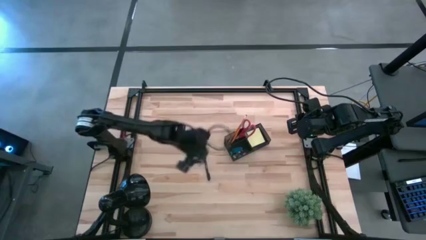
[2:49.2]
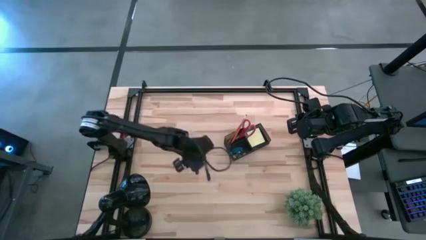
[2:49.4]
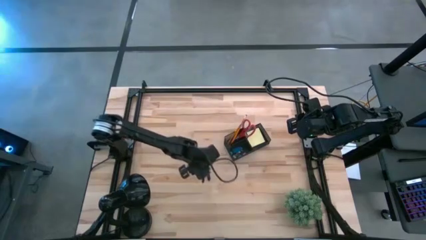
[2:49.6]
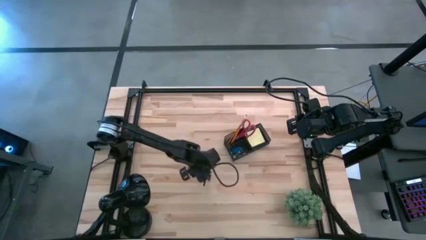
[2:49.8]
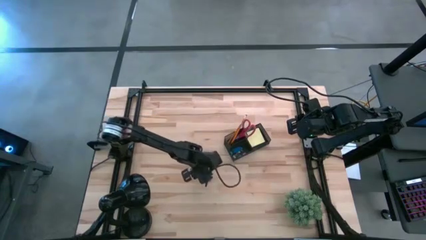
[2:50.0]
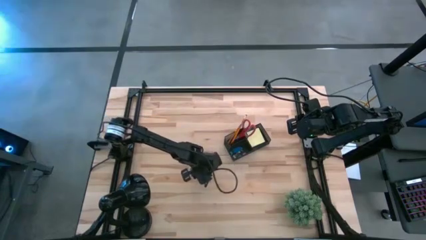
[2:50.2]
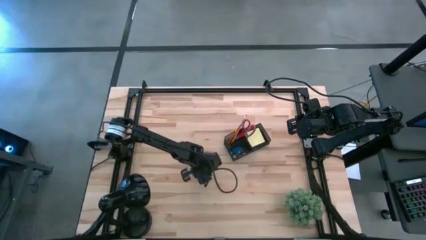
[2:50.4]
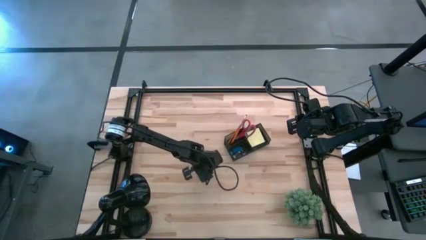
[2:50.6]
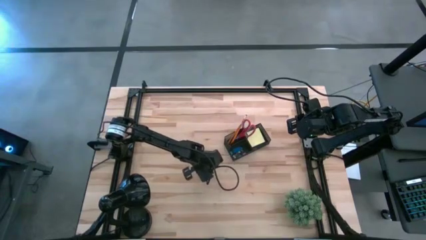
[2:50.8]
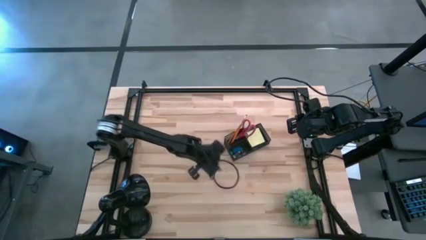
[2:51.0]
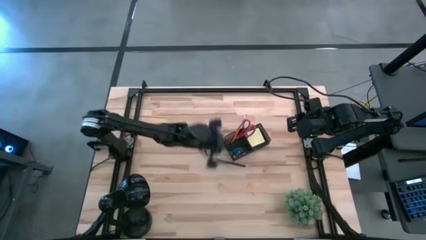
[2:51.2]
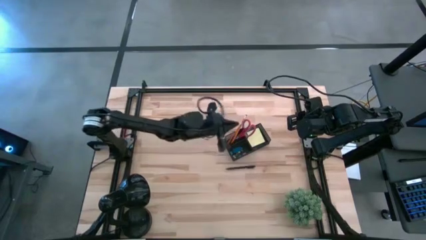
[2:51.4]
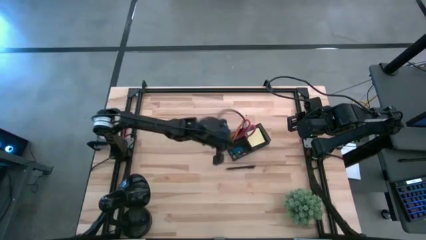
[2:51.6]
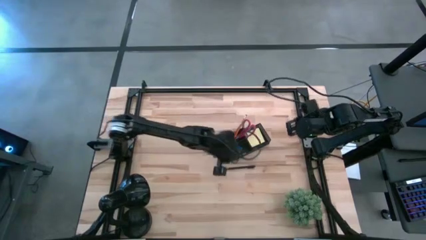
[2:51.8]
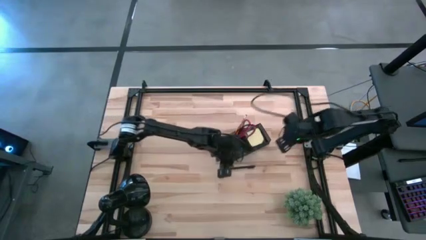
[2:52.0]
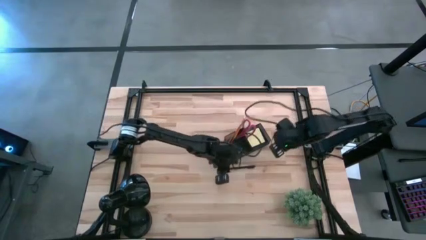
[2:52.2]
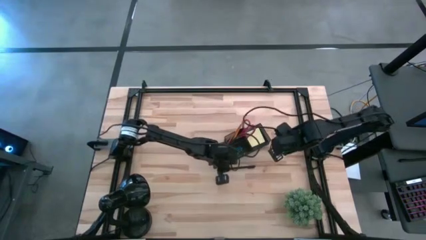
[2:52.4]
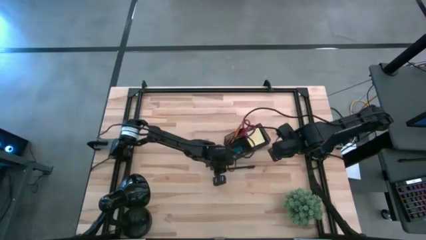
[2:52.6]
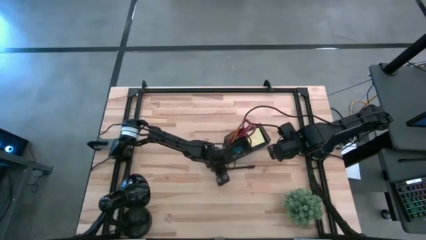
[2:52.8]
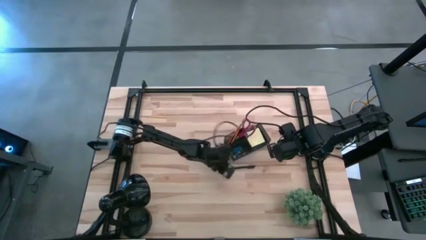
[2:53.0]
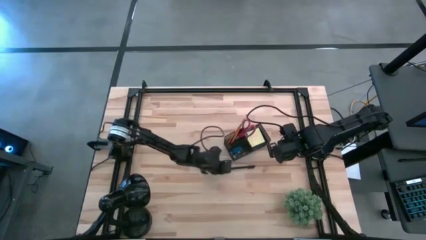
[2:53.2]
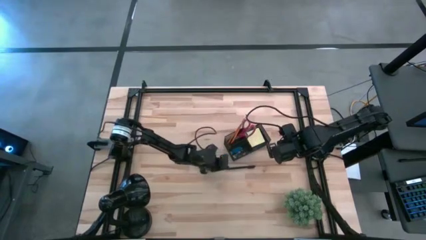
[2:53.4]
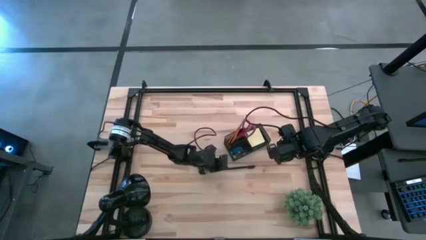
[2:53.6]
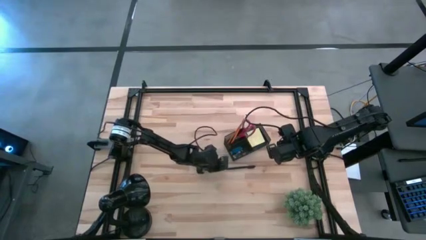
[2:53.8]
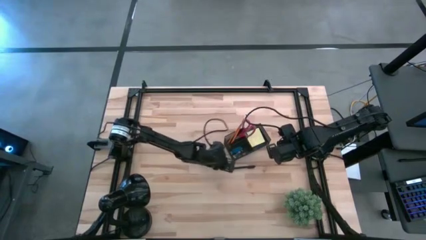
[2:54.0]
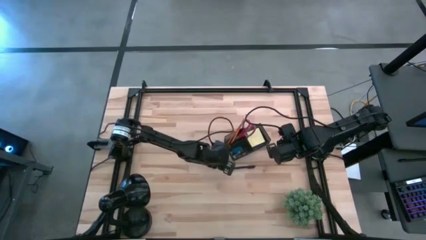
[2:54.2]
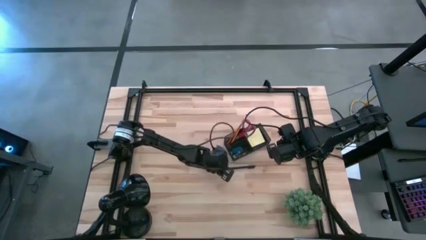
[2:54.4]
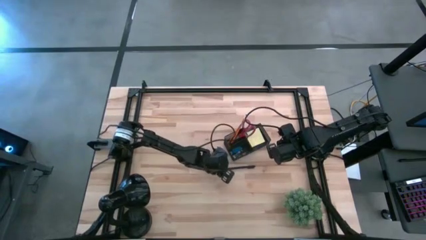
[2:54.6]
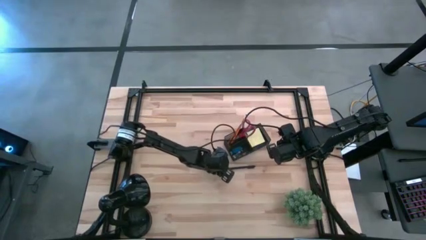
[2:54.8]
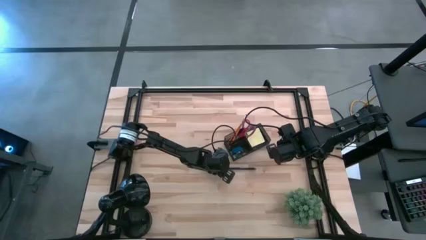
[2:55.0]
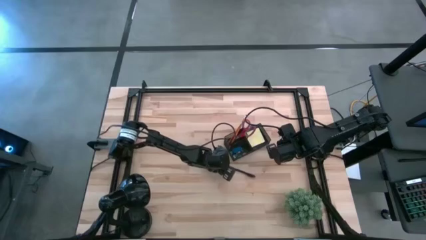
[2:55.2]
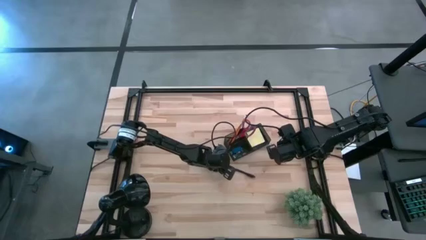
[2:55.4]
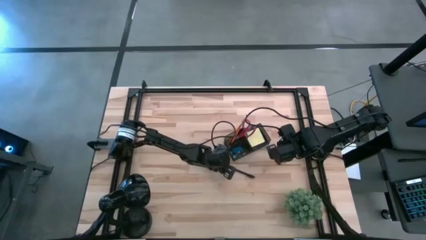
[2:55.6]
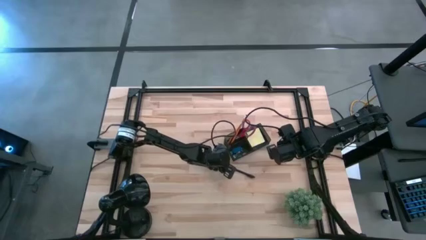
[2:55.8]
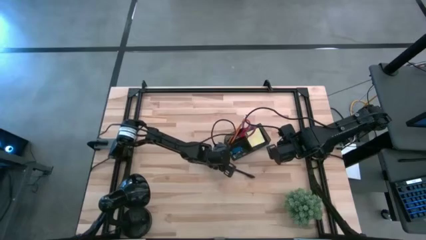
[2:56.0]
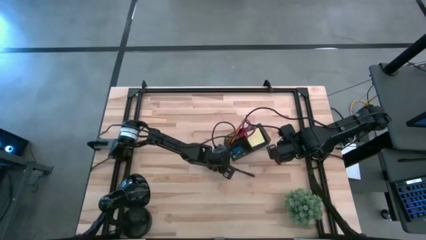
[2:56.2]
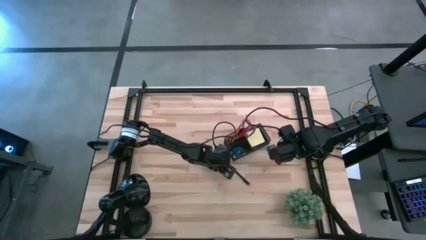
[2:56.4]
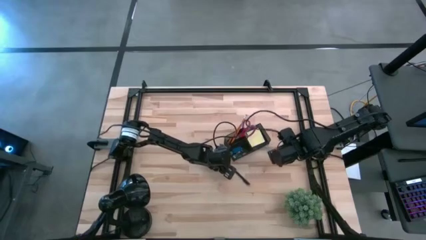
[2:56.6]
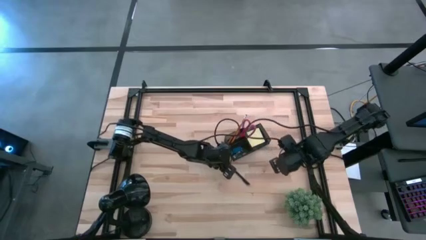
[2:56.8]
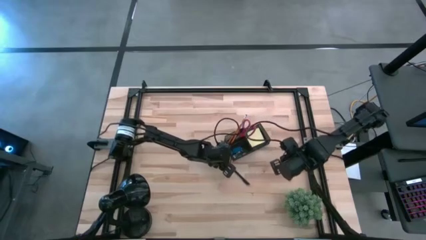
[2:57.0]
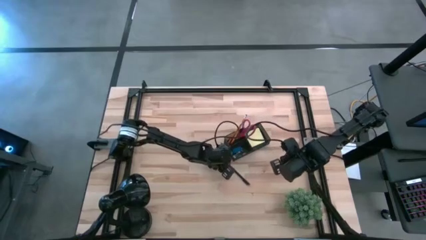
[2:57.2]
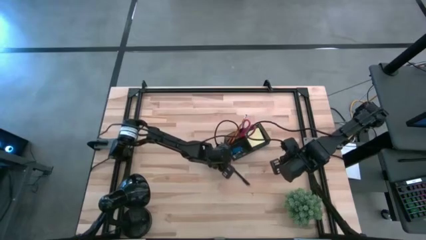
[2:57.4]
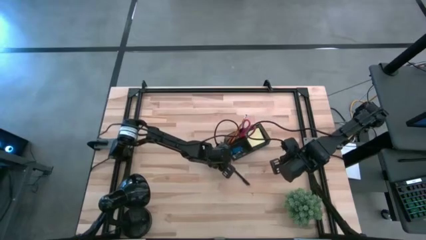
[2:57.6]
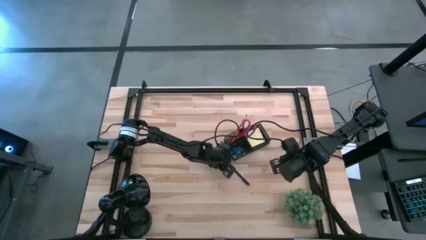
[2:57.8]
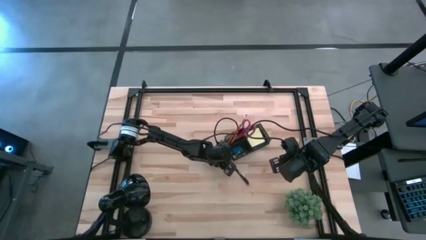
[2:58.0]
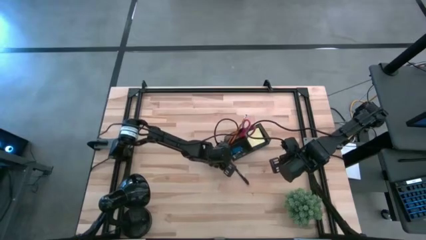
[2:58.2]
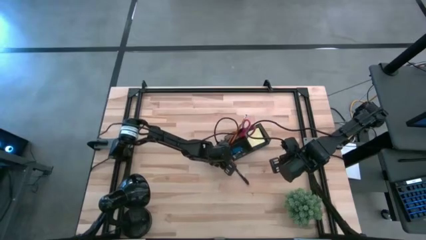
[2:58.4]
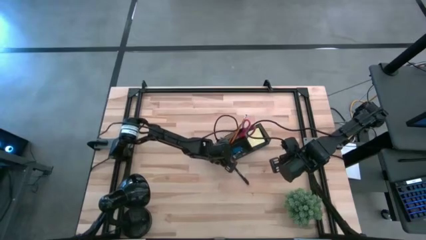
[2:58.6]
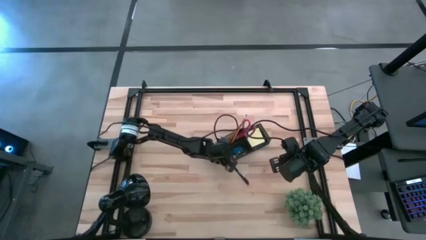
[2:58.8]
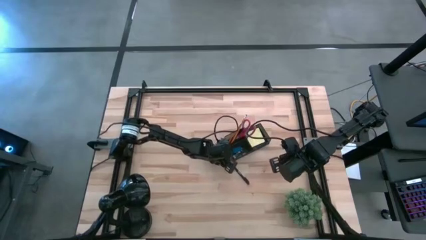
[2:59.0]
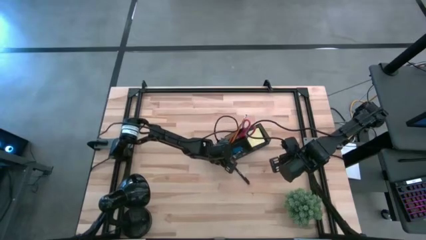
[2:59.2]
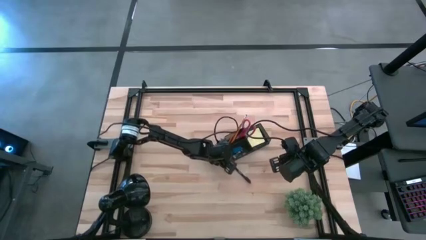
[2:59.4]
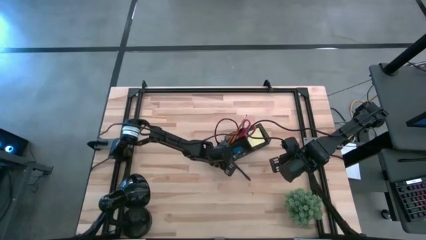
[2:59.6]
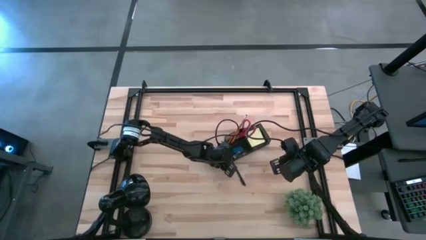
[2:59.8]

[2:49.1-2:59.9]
Task: Pick and place office supplies into organizer
Put the pen into the desk organizer

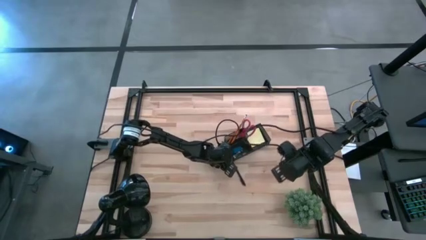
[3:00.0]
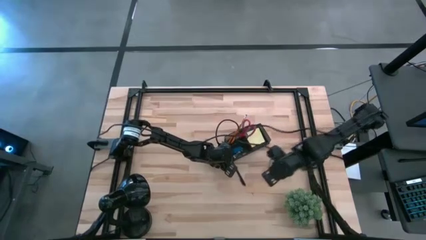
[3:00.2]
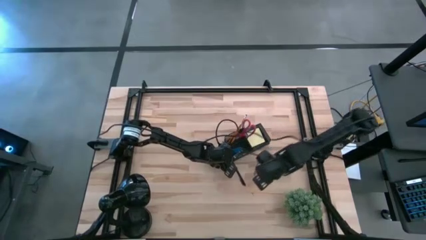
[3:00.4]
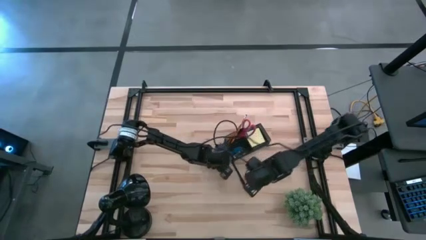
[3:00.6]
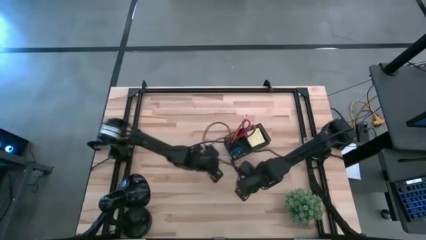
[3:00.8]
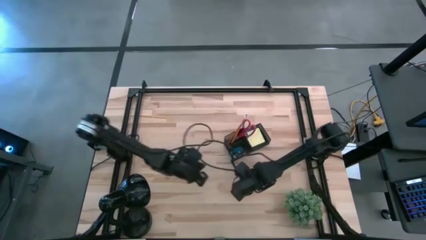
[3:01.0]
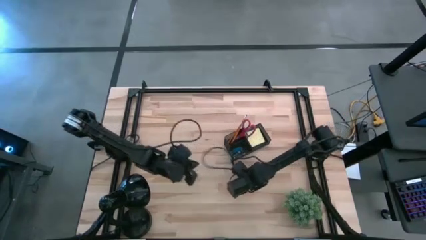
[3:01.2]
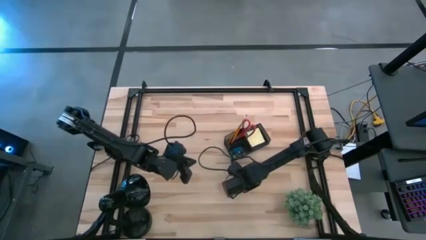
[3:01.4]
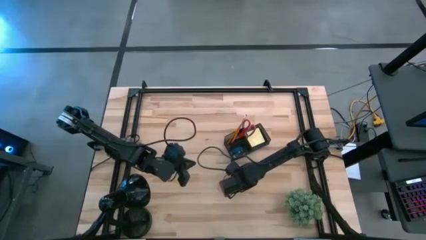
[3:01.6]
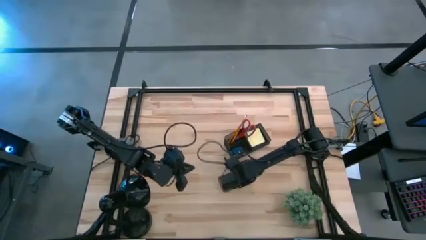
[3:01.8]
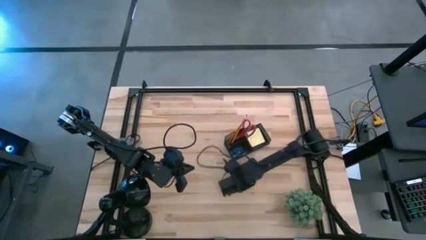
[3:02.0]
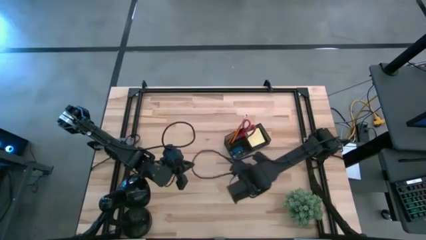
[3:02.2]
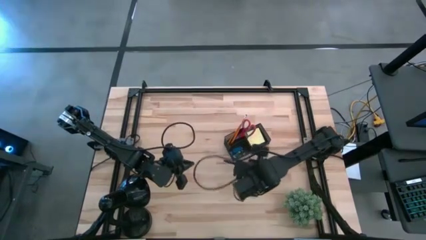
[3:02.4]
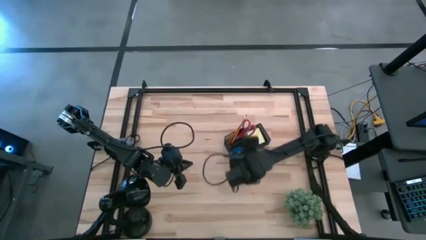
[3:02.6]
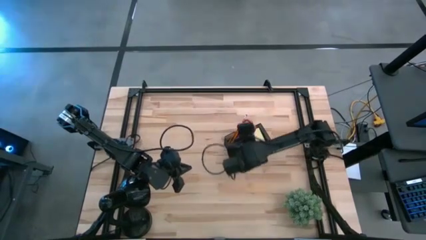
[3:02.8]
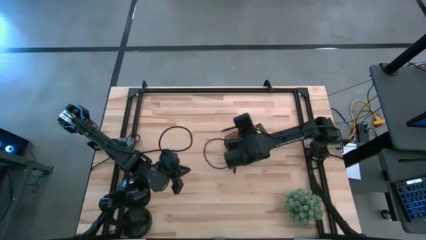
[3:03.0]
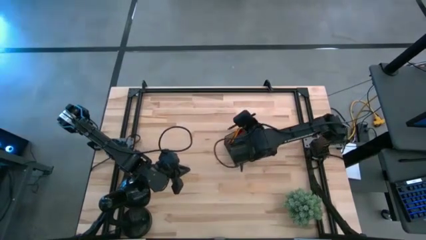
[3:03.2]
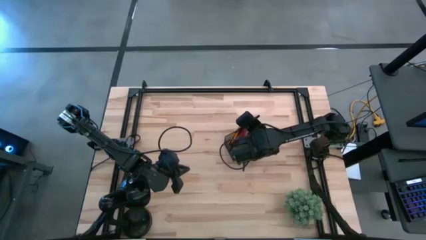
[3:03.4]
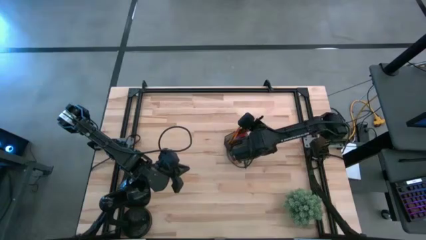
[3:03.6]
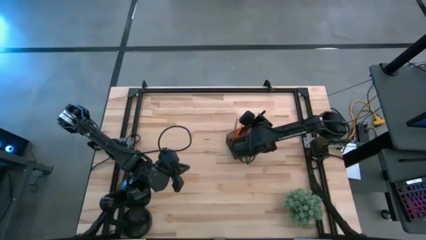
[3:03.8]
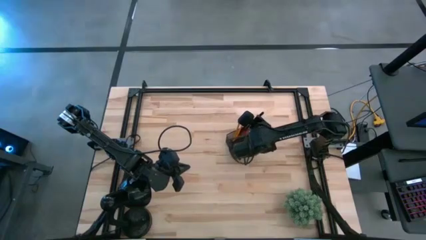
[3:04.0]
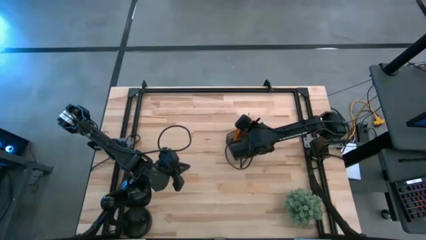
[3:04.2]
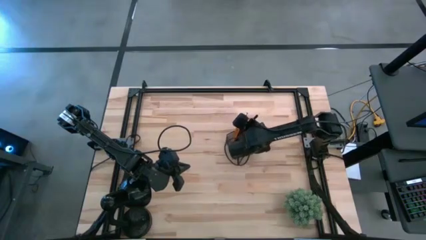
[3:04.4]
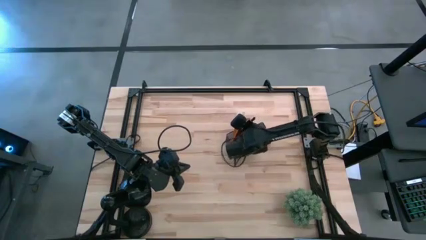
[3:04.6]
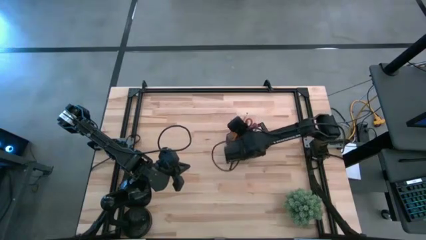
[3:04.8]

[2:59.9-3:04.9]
Put the pen into the desk organizer
